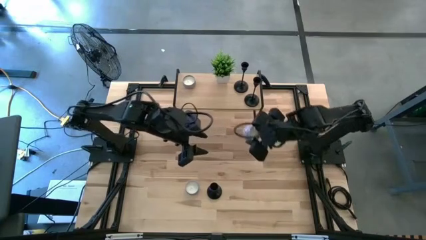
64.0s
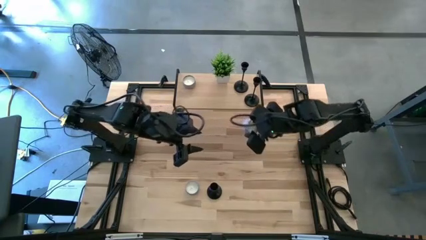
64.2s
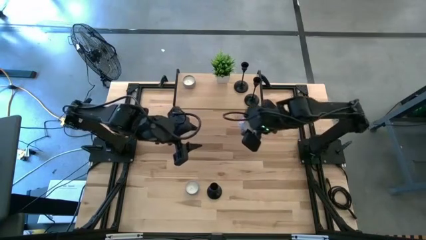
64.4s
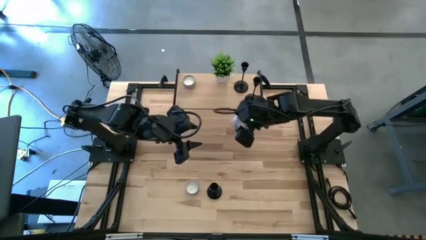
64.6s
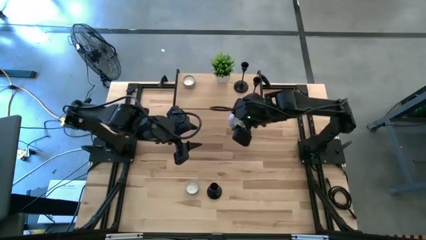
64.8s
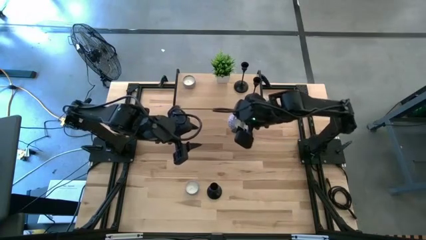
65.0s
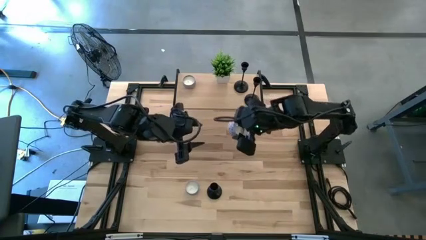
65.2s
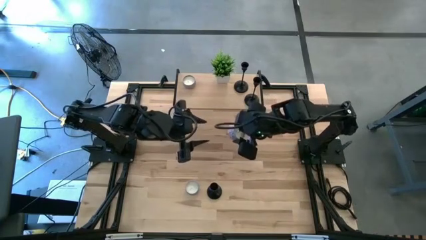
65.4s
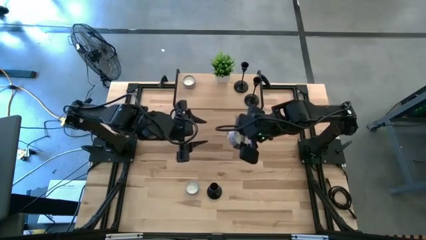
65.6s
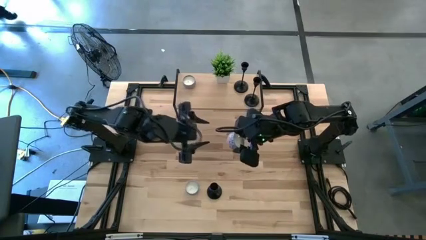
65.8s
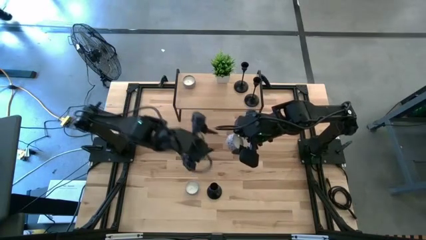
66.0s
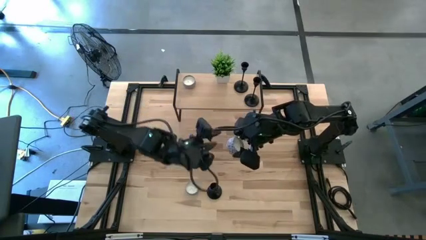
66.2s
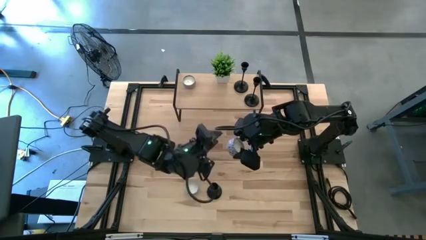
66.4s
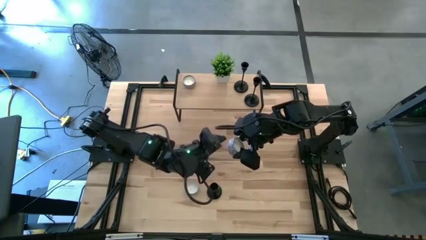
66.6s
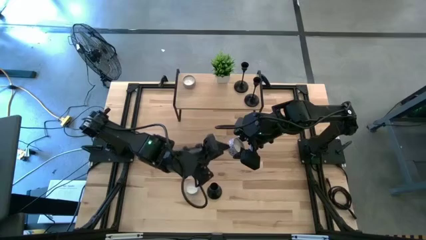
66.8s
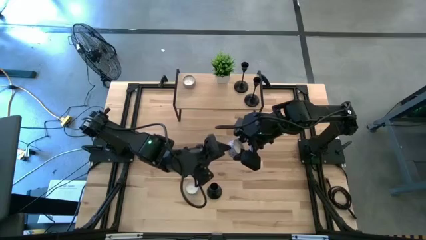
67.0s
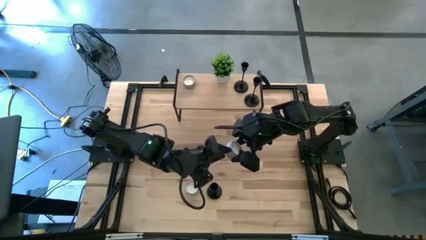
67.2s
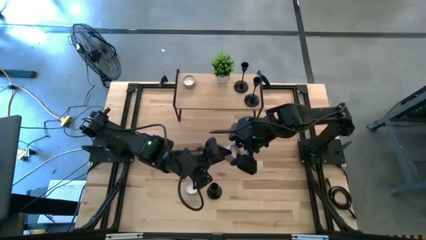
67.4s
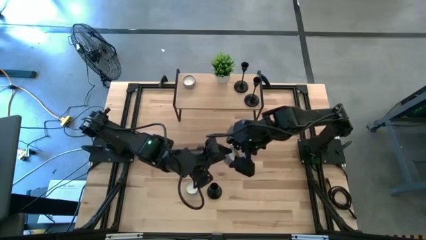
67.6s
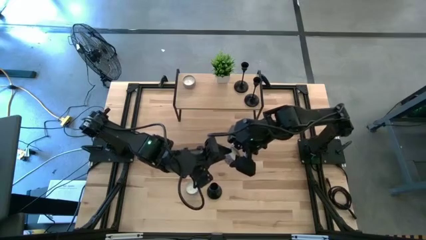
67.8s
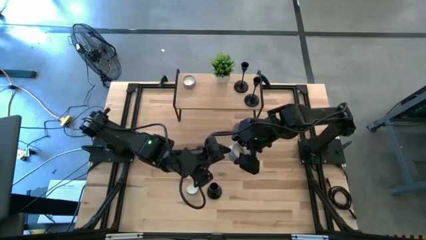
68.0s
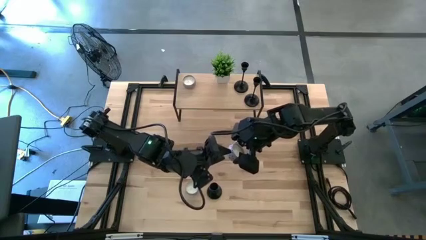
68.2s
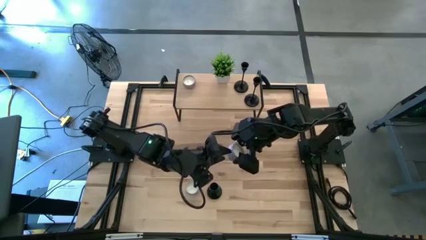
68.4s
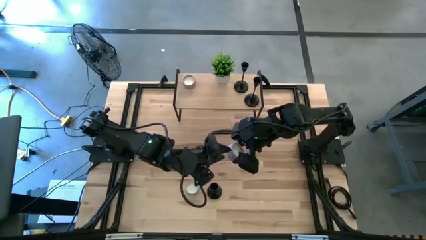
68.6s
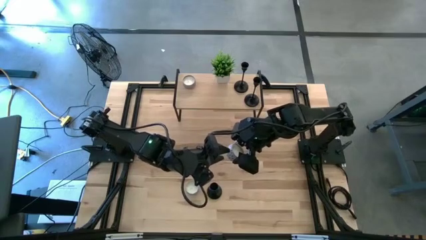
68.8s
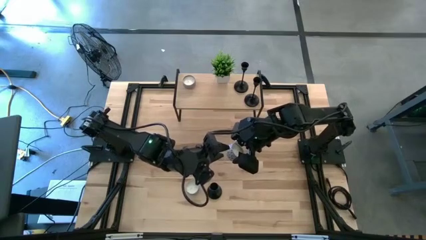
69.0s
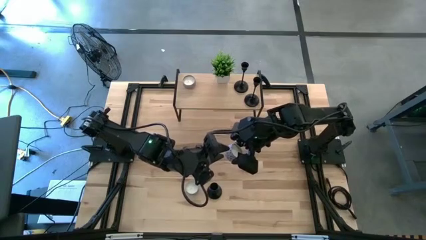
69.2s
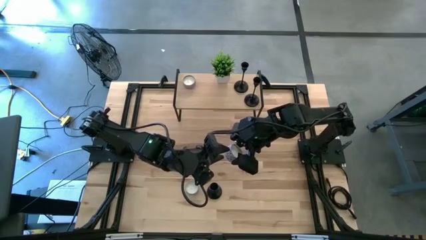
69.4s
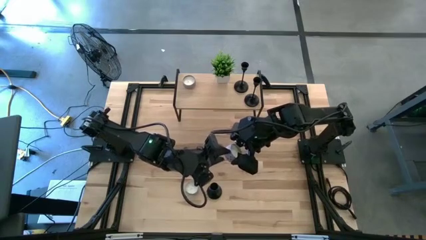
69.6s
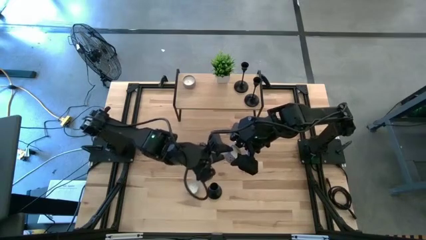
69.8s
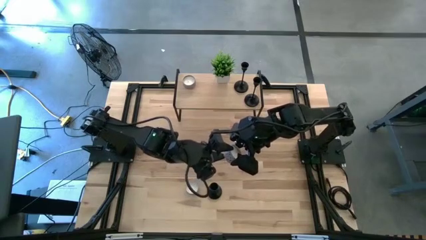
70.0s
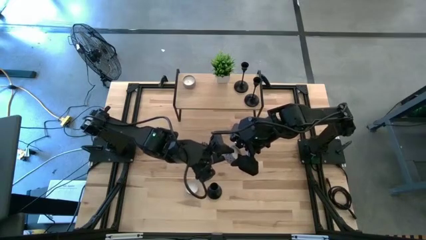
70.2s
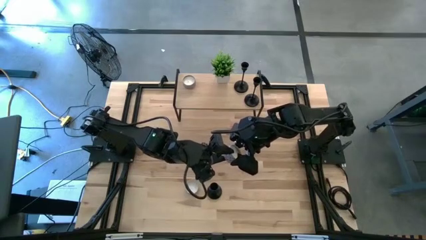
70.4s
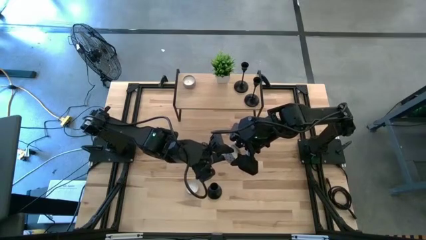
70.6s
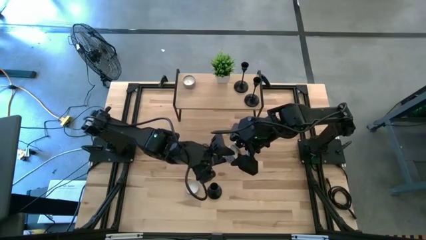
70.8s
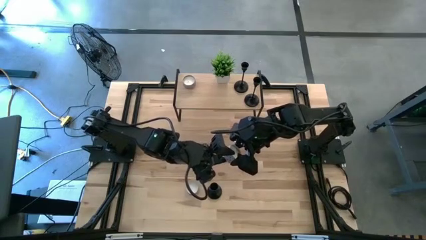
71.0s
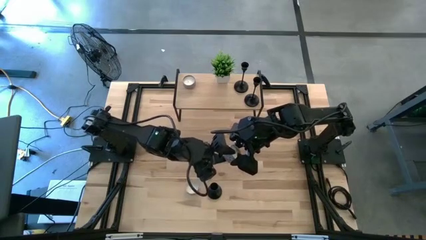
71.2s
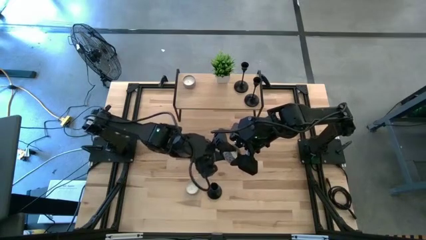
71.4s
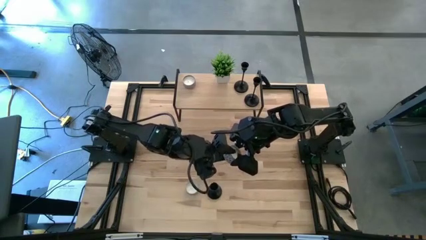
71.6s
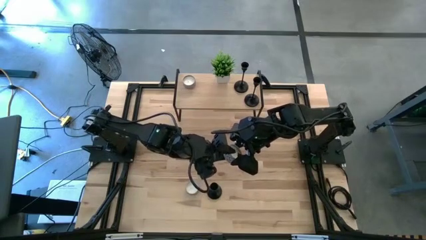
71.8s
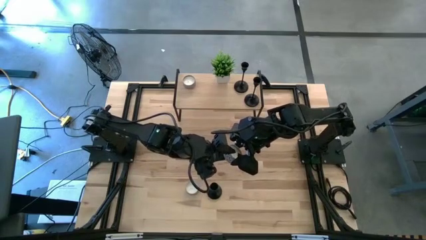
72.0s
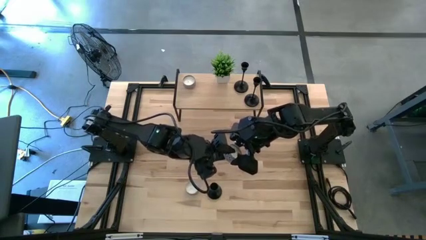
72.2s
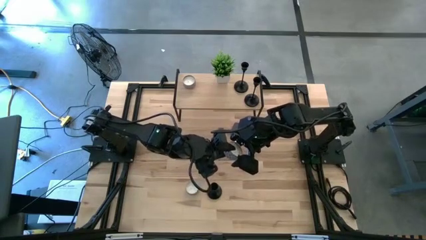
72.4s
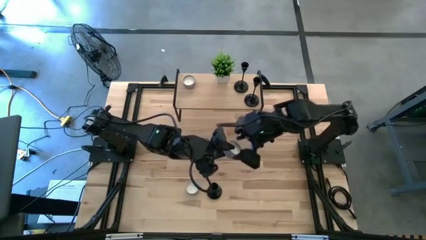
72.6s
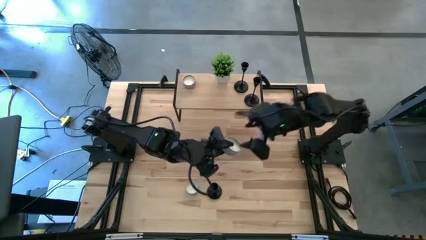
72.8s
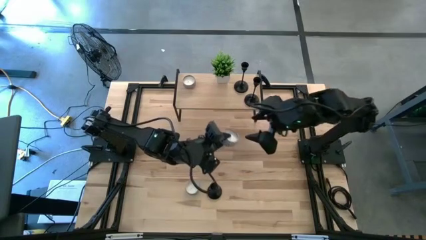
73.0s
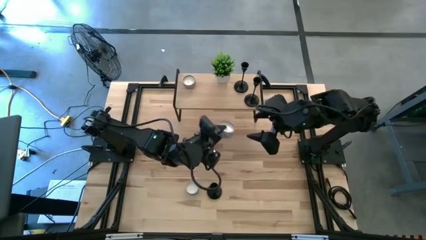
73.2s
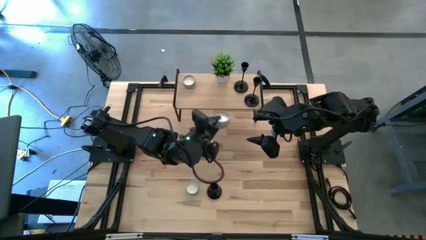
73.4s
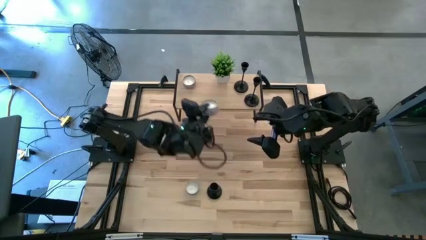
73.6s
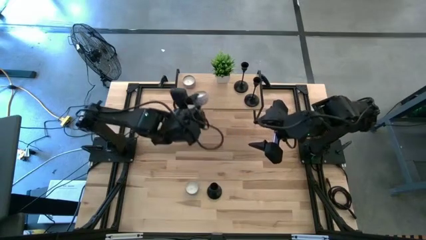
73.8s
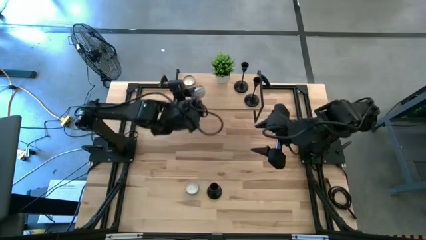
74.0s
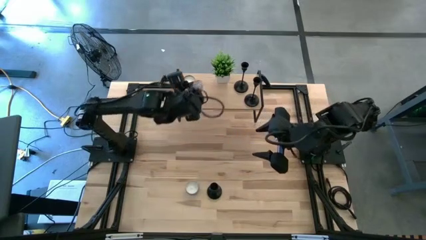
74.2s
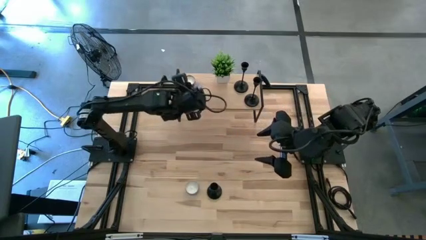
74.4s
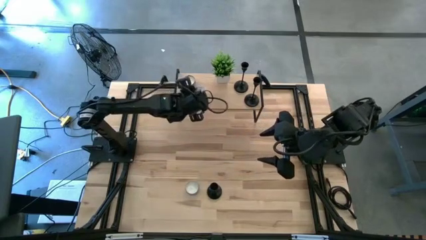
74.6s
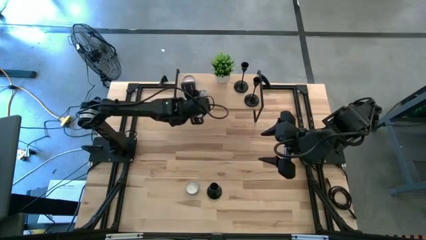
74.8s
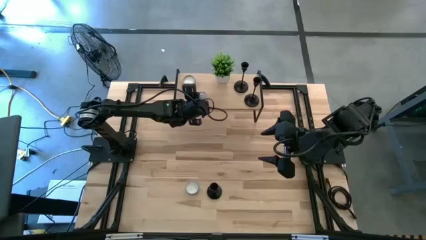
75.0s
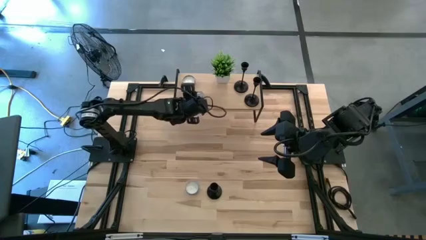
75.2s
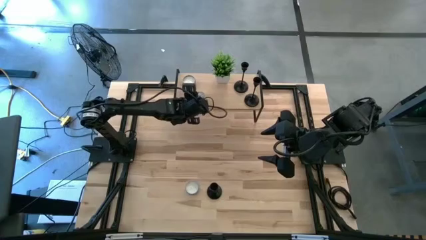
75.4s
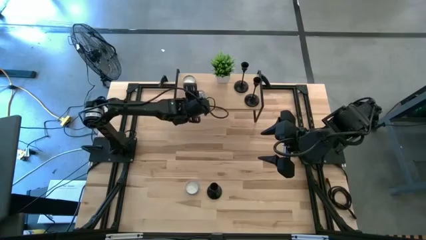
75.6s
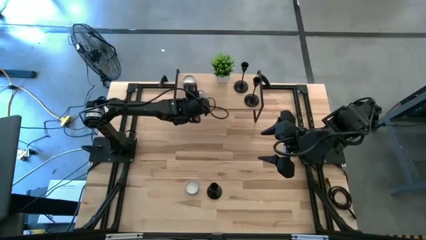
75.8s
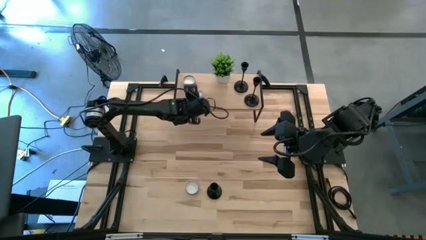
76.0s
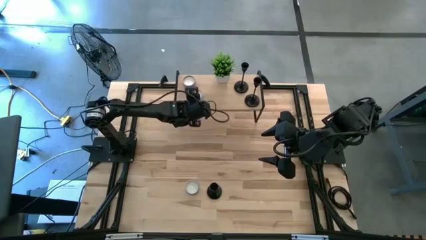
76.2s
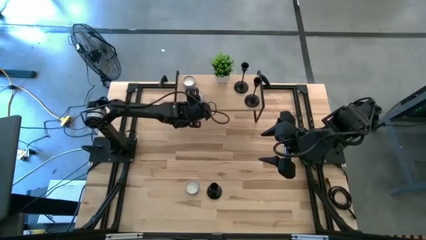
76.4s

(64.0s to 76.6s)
Task: Pick & Place candle stick holders
Put the white candle on the shelf
